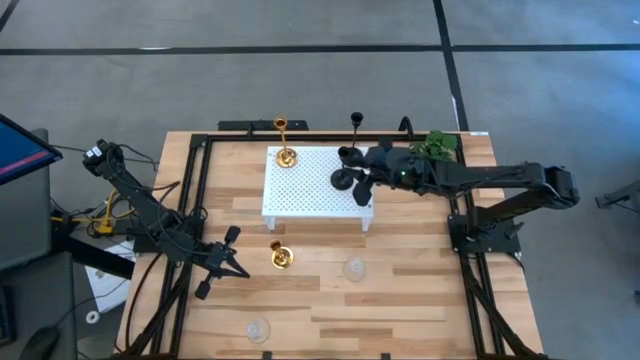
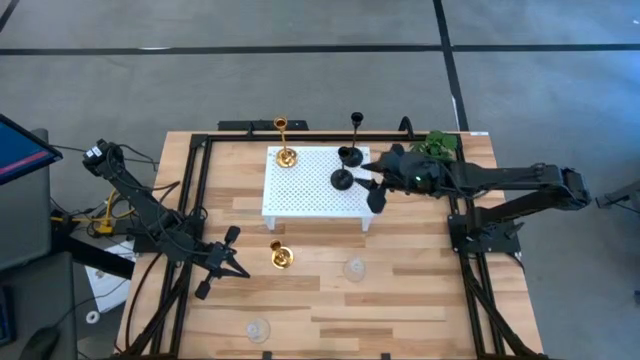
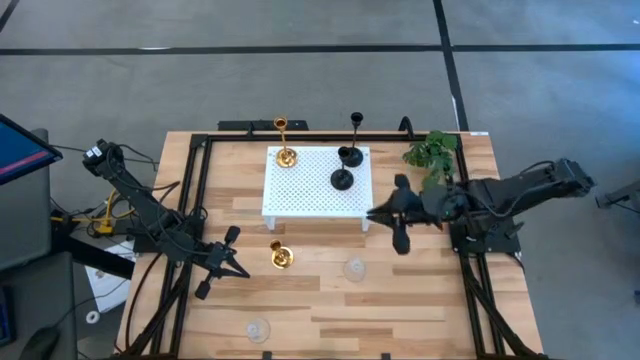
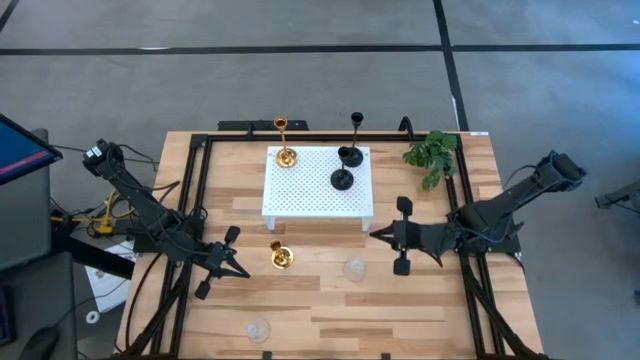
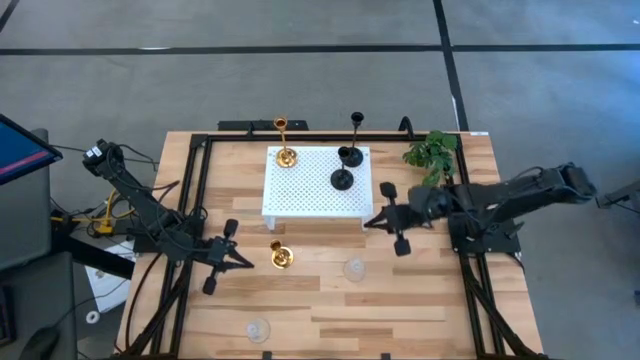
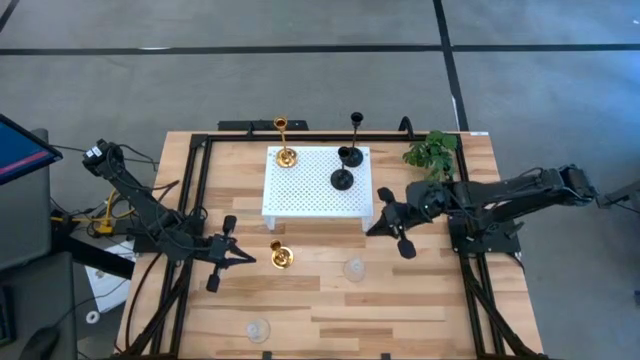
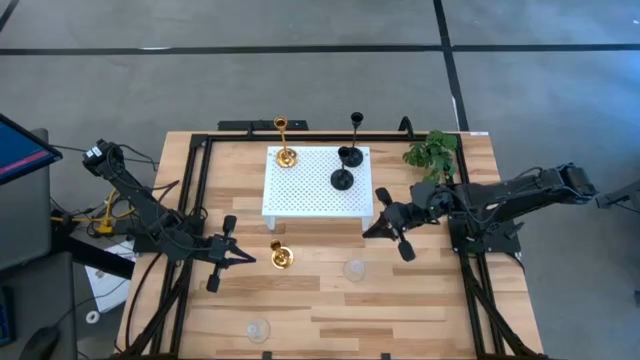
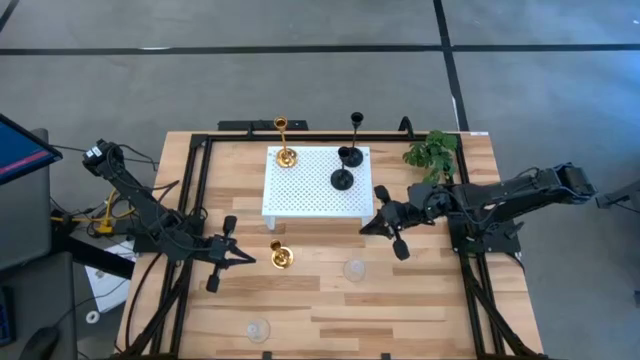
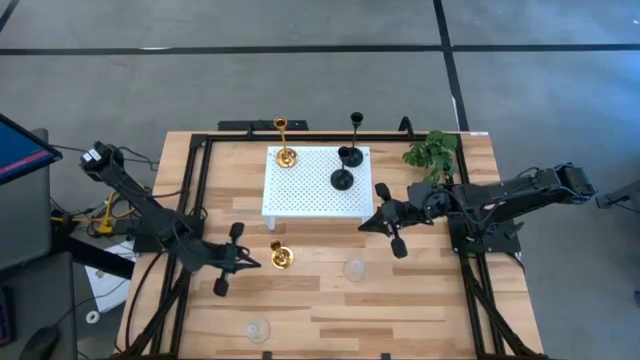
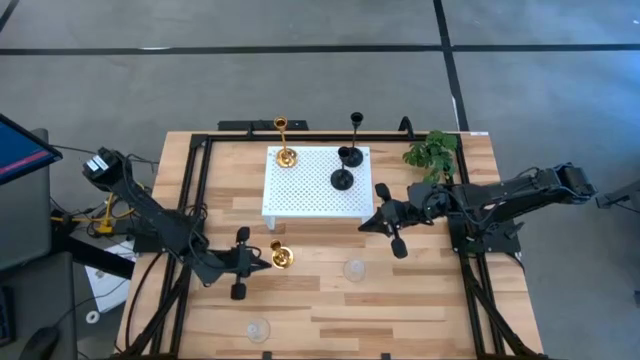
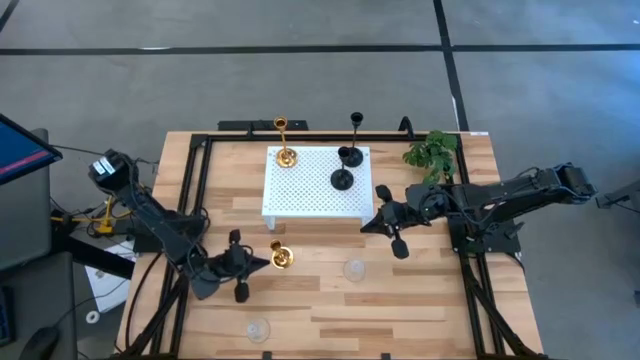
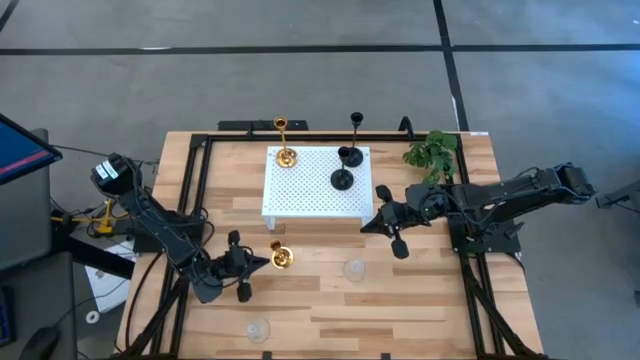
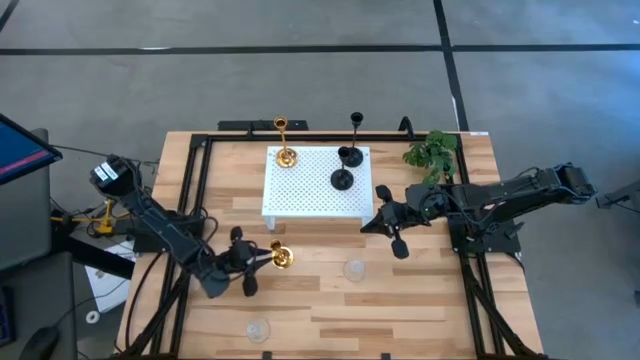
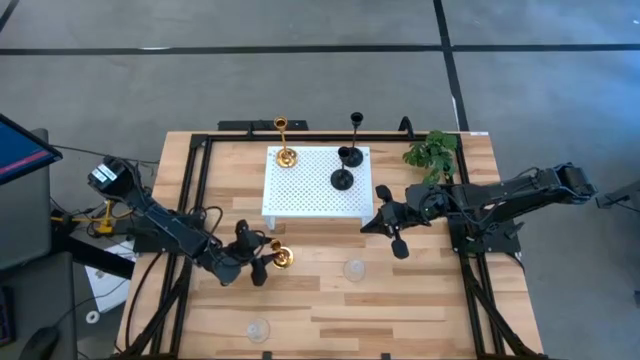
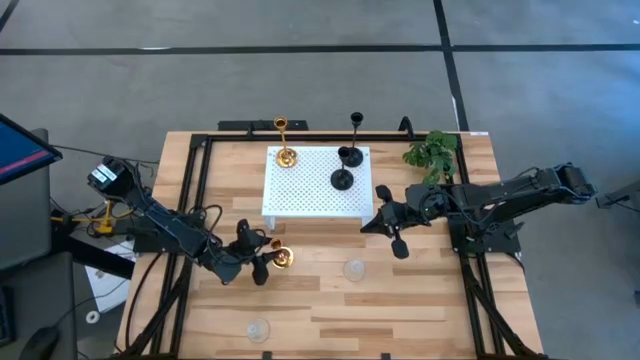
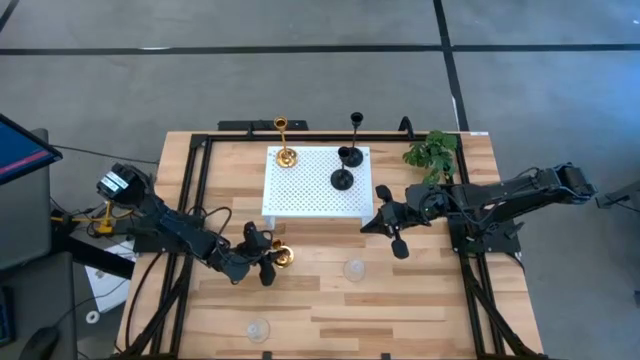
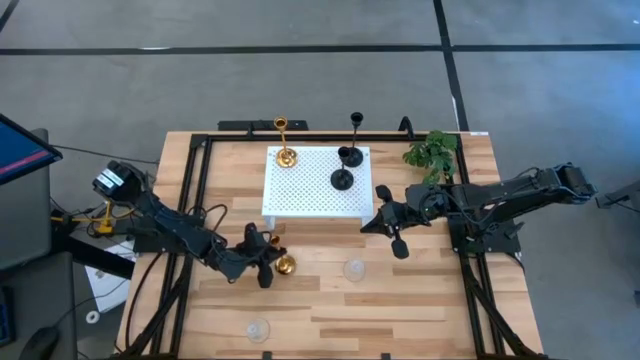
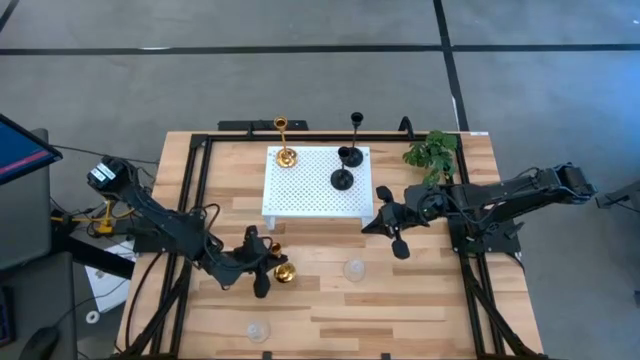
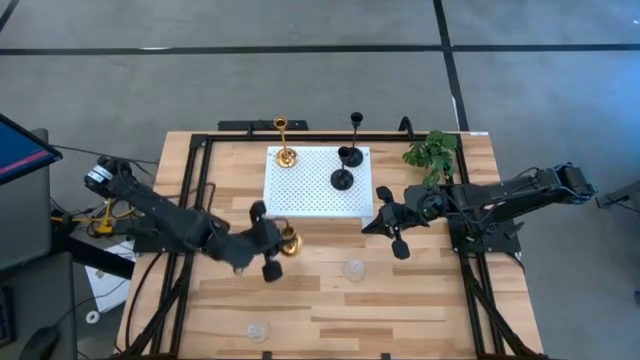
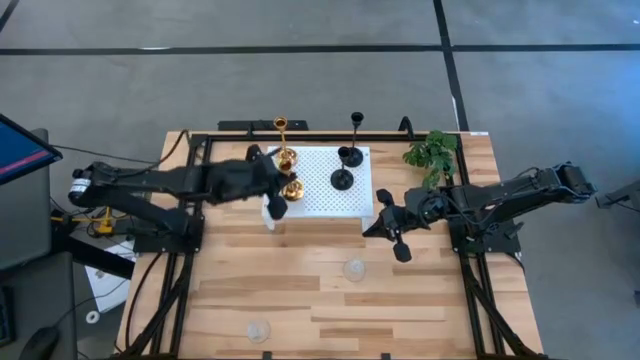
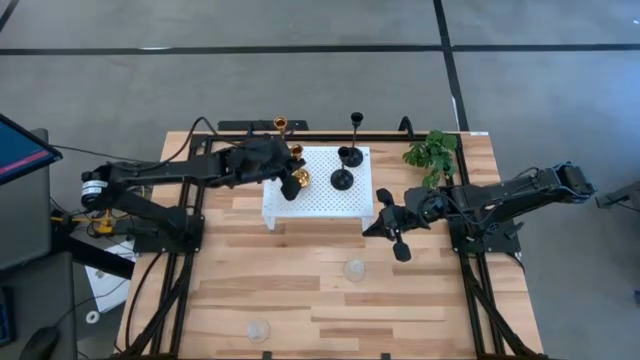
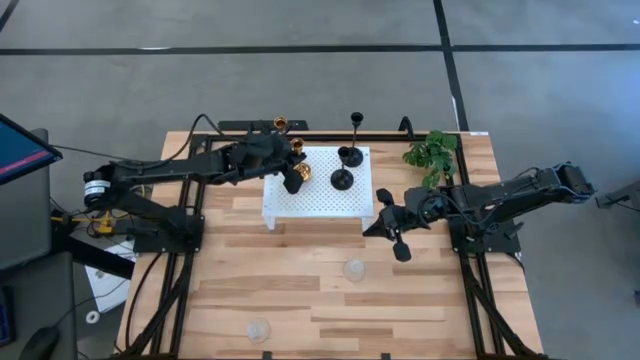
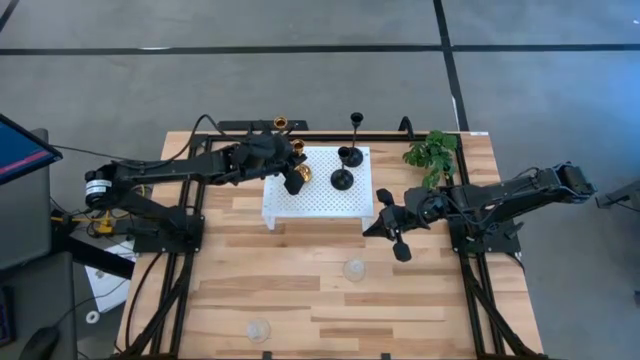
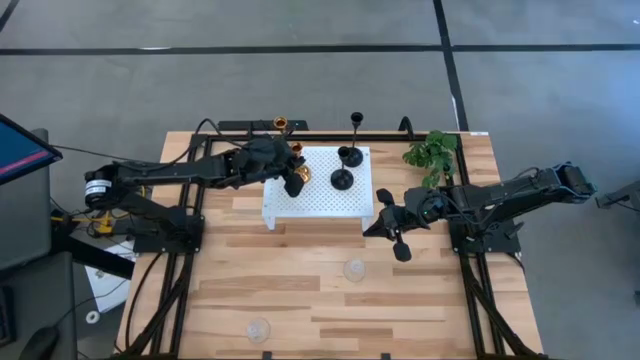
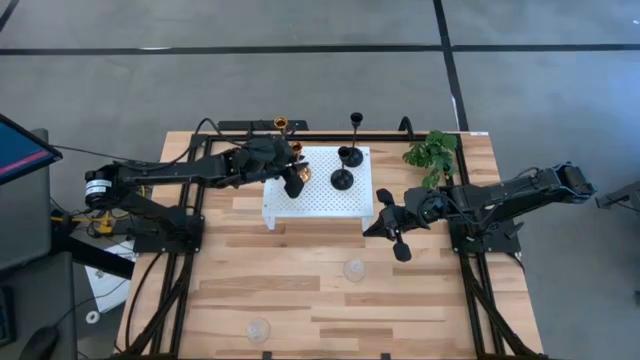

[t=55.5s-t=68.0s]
Task: Pick & Place candle stick holders
Put the golden candle holder on the shelf aligned with the other golden candle holder

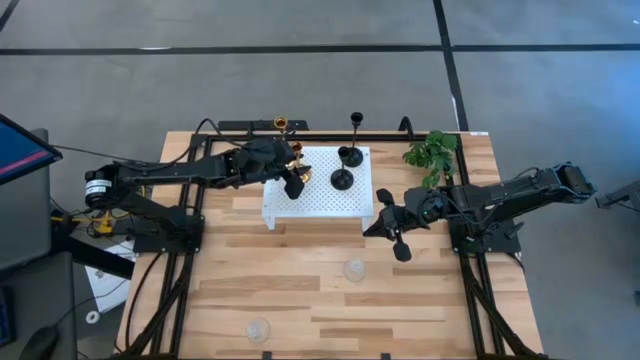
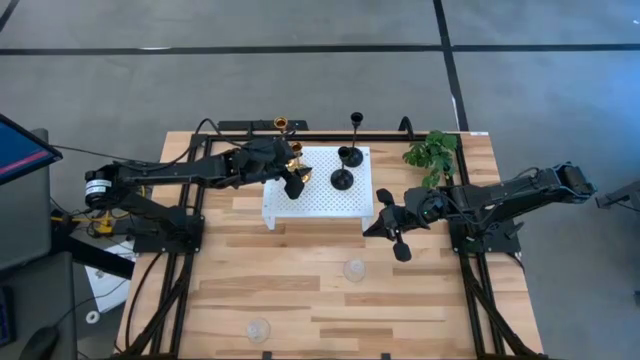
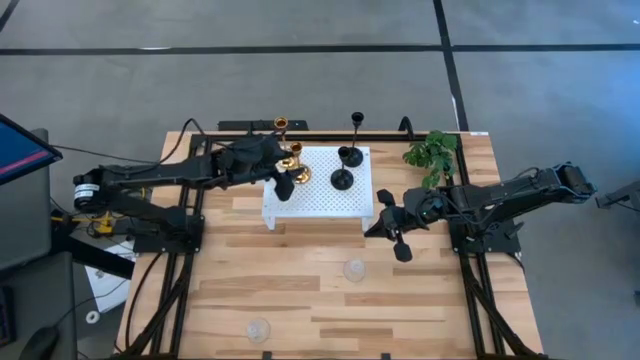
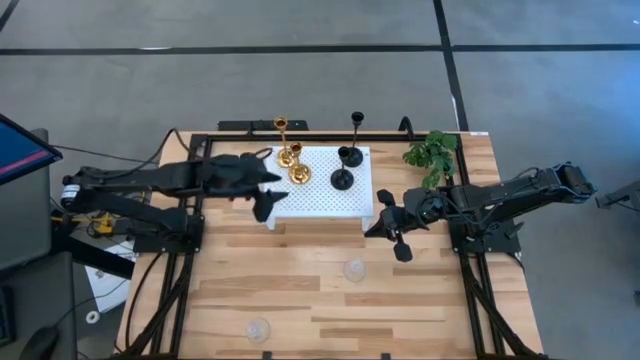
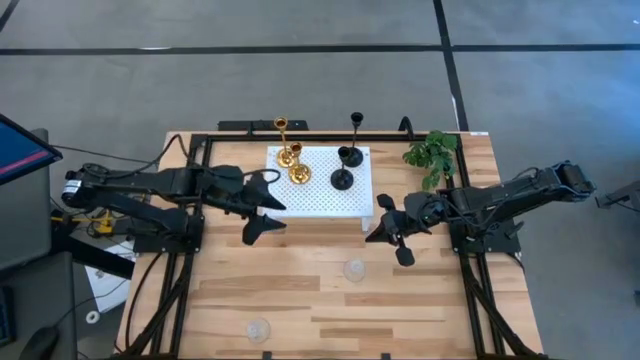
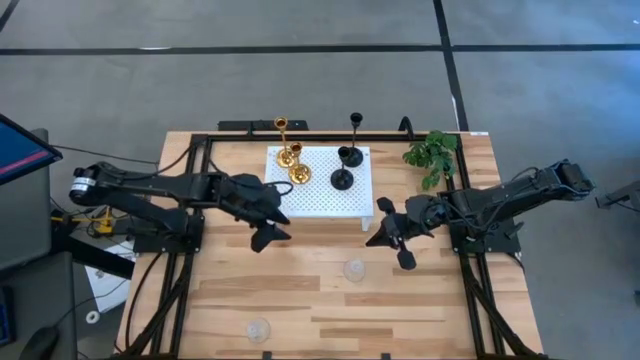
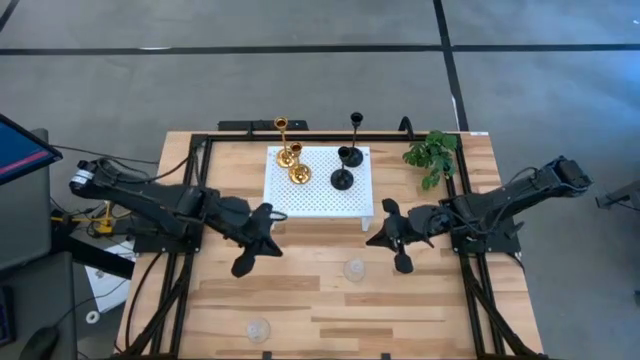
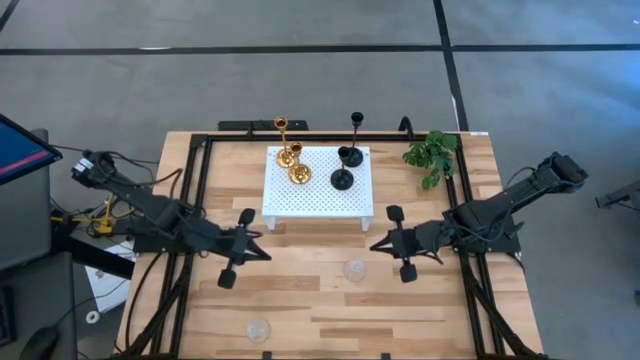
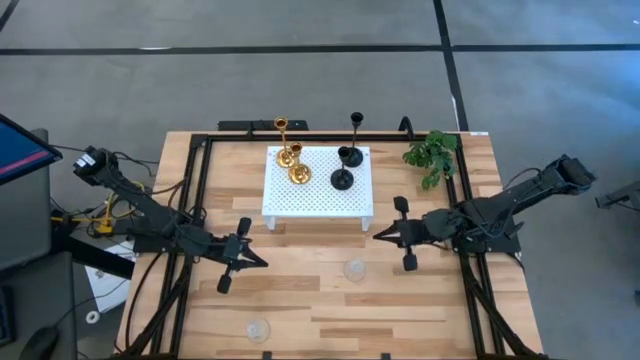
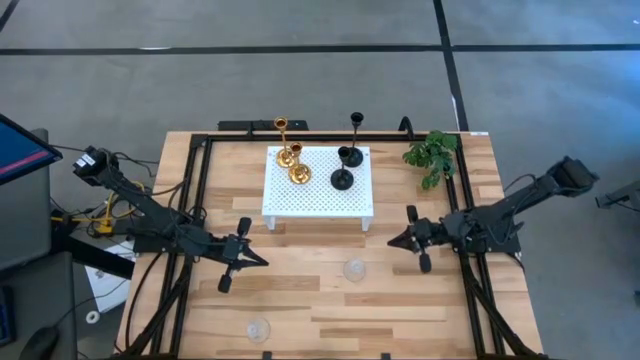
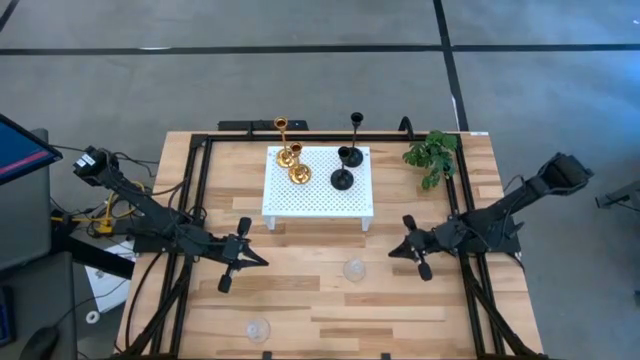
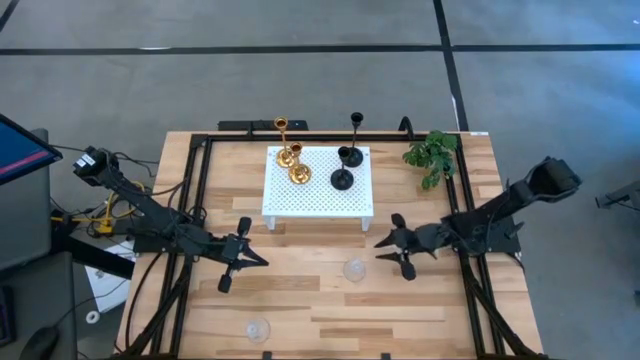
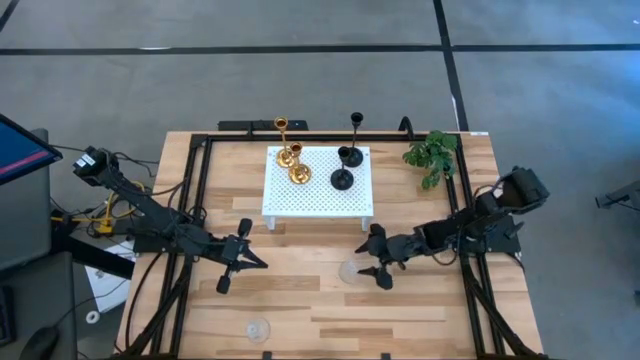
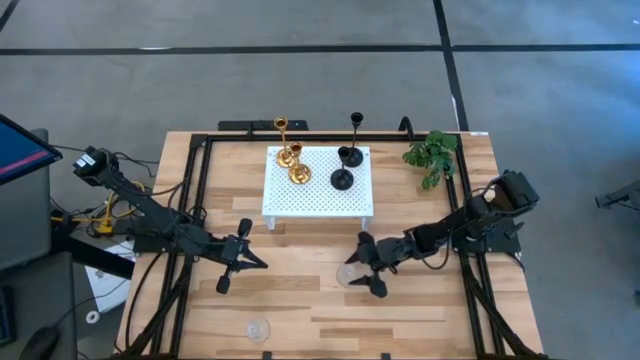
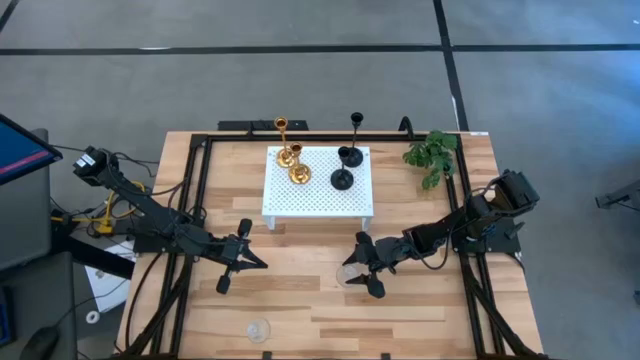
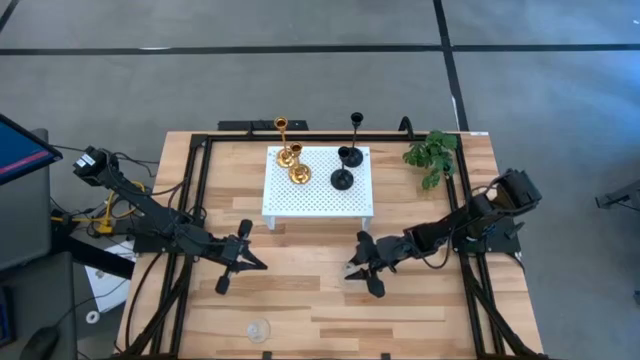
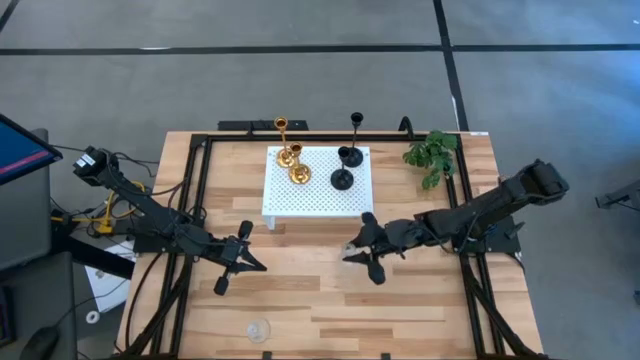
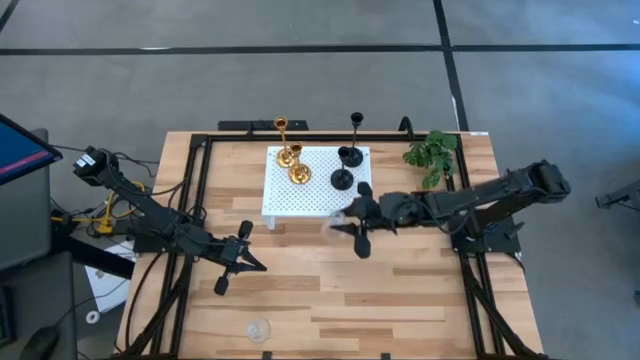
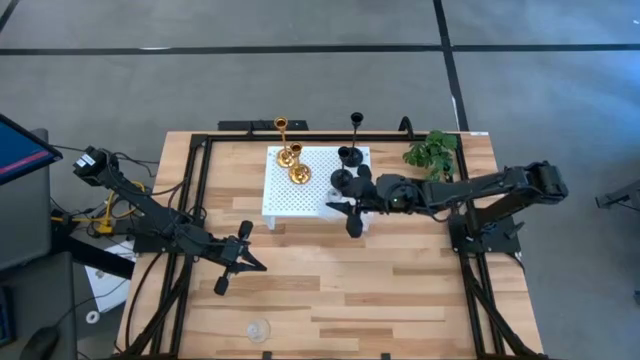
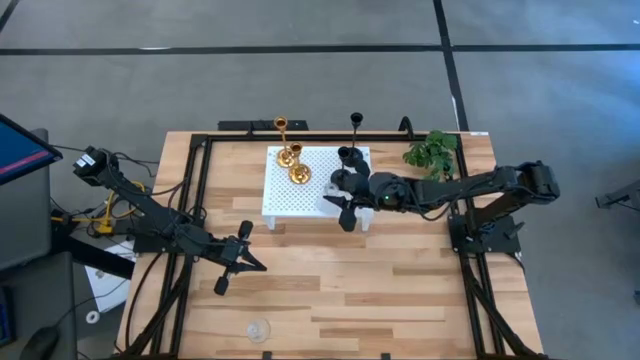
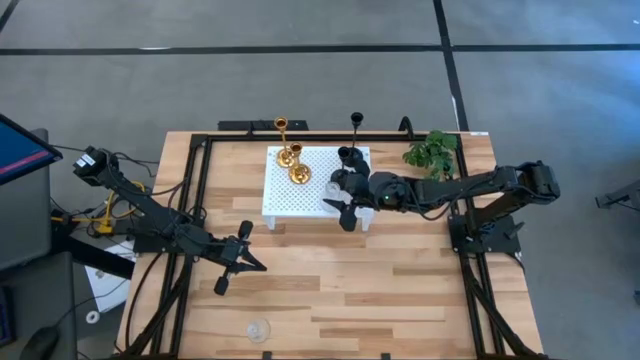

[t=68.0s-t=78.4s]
Put the right glass candle holder on the shelf
